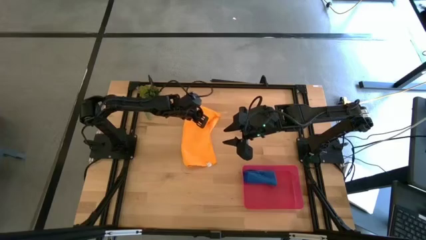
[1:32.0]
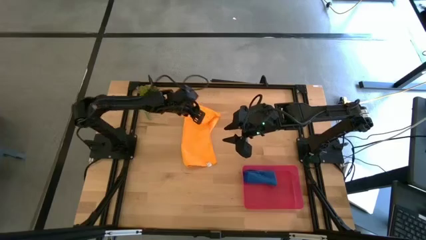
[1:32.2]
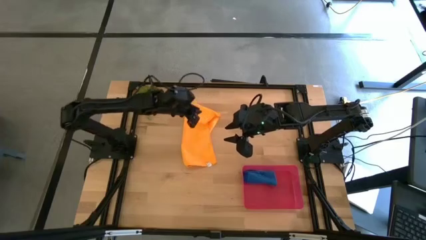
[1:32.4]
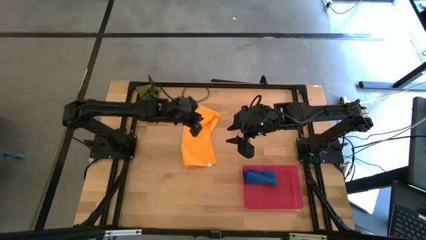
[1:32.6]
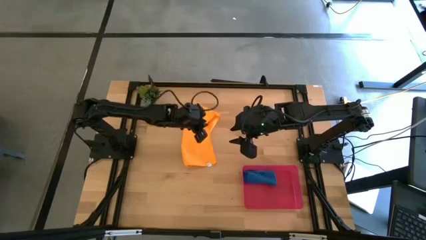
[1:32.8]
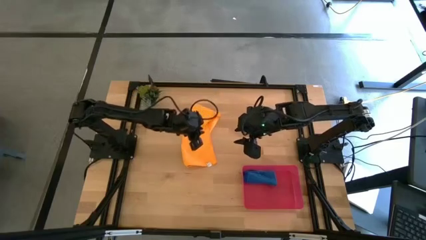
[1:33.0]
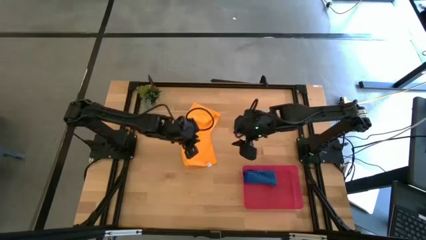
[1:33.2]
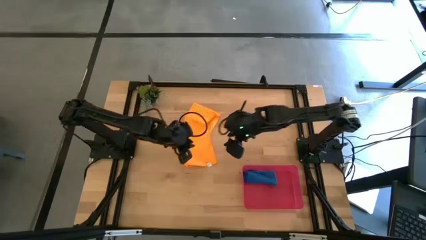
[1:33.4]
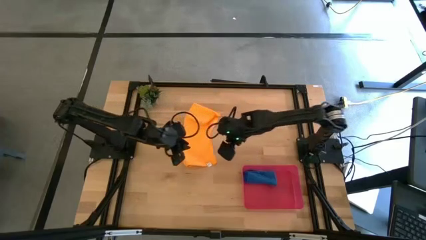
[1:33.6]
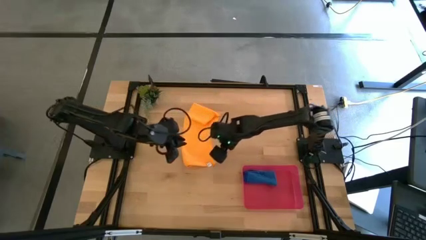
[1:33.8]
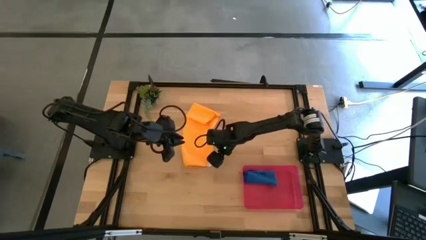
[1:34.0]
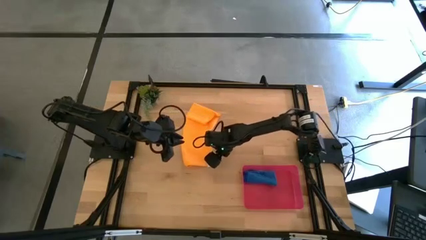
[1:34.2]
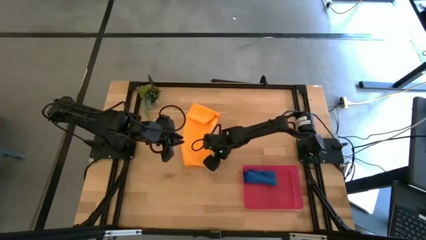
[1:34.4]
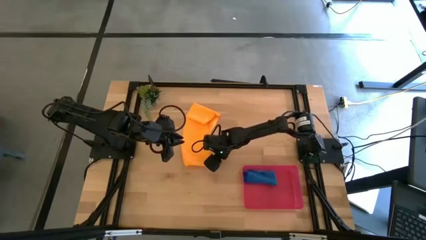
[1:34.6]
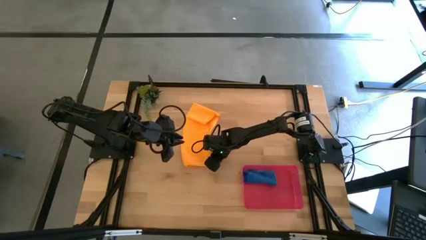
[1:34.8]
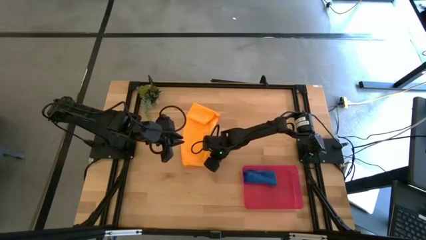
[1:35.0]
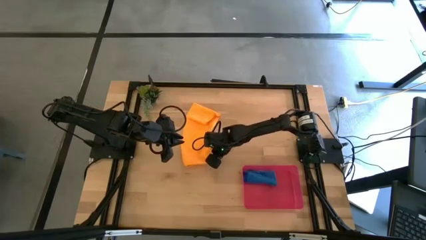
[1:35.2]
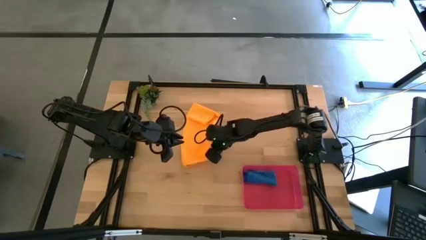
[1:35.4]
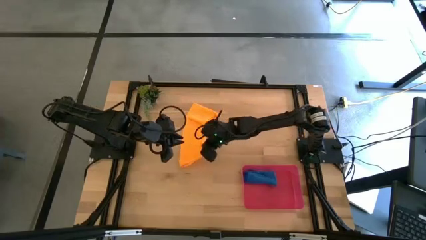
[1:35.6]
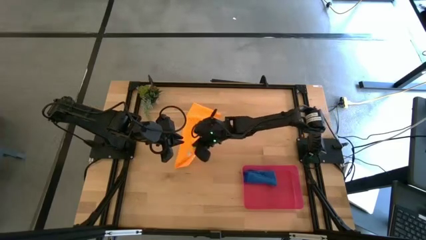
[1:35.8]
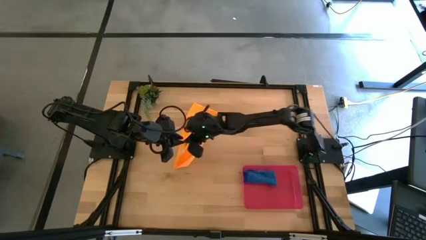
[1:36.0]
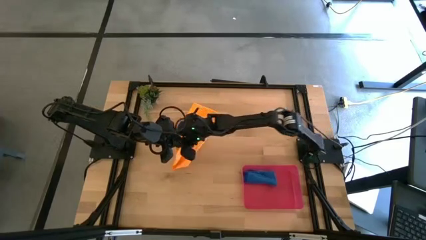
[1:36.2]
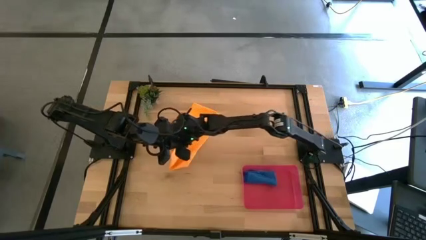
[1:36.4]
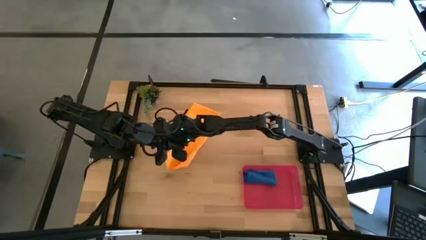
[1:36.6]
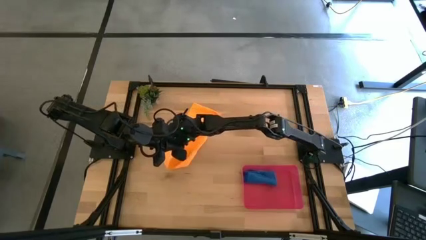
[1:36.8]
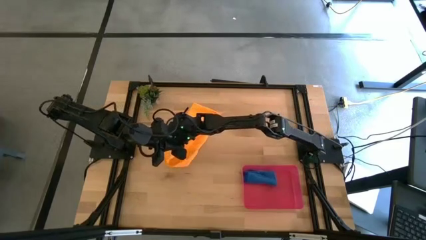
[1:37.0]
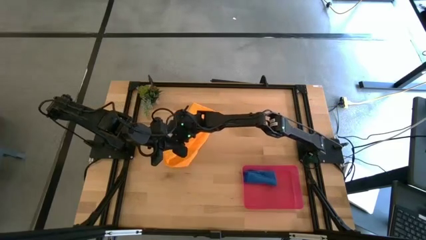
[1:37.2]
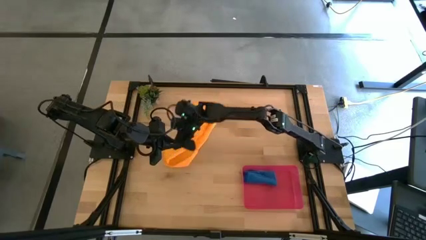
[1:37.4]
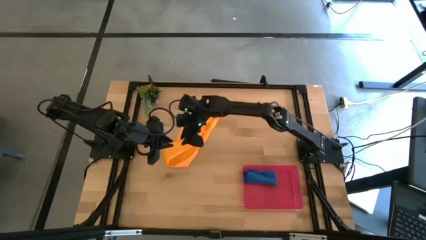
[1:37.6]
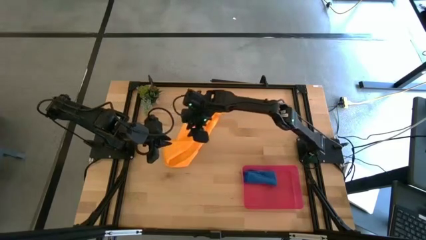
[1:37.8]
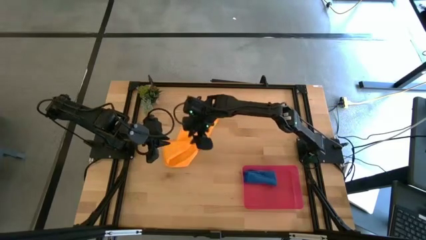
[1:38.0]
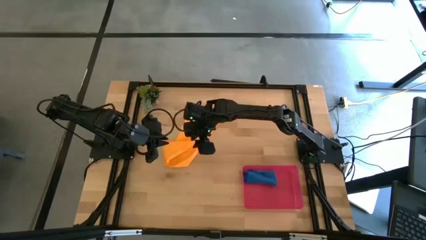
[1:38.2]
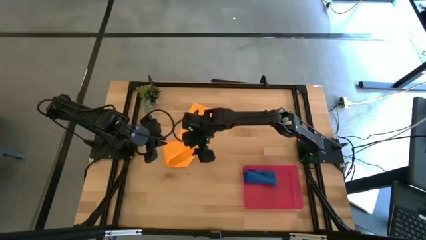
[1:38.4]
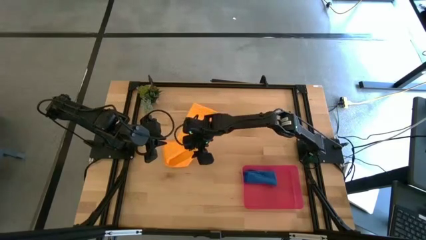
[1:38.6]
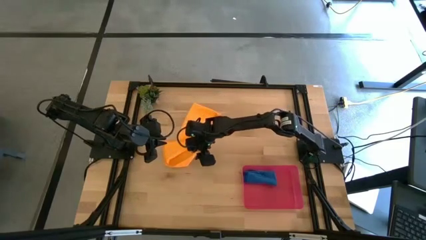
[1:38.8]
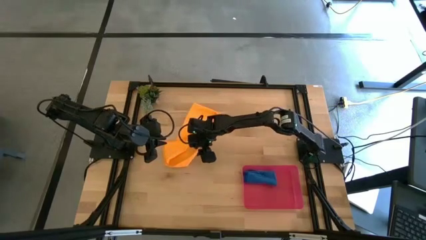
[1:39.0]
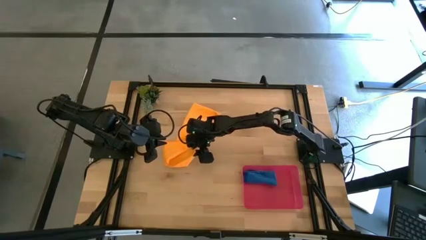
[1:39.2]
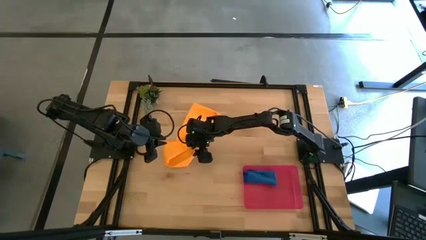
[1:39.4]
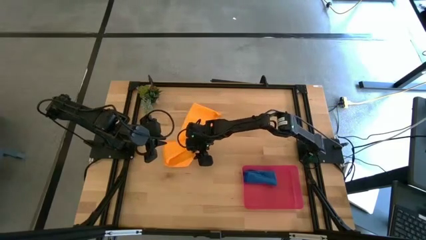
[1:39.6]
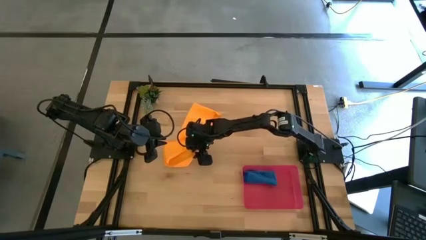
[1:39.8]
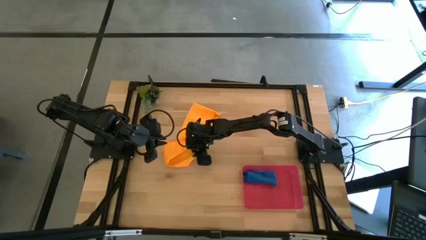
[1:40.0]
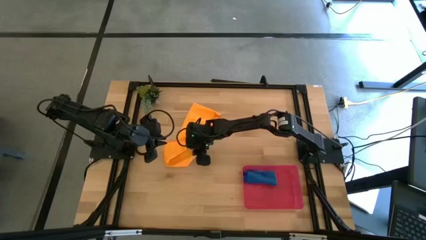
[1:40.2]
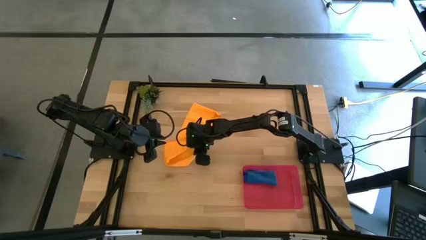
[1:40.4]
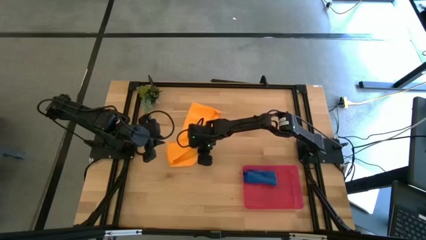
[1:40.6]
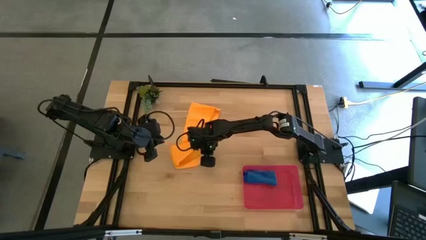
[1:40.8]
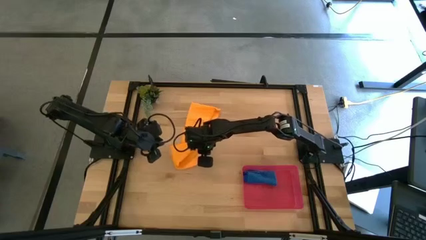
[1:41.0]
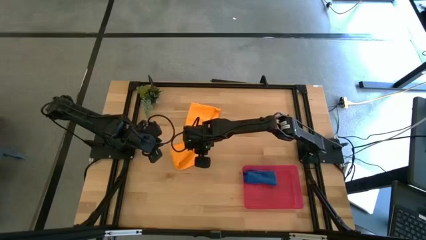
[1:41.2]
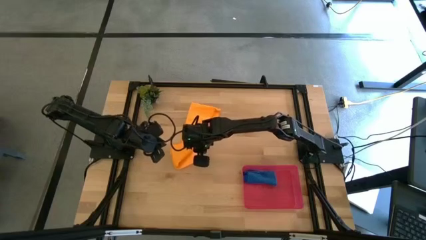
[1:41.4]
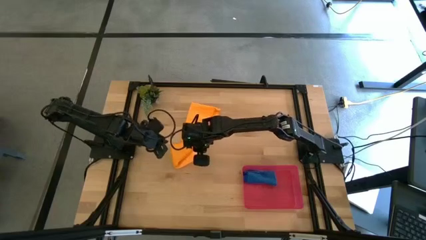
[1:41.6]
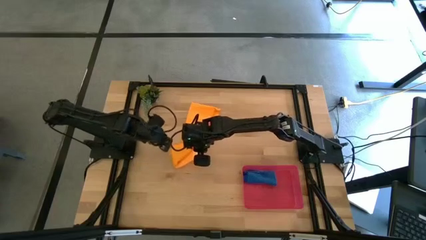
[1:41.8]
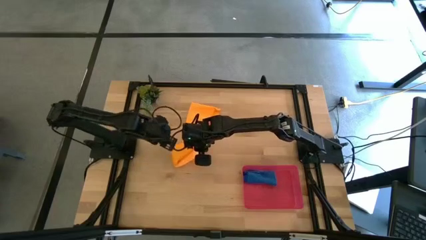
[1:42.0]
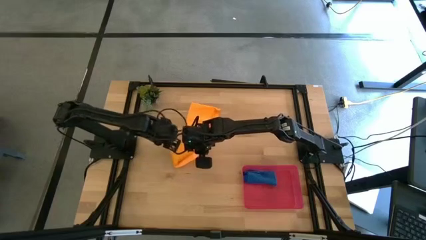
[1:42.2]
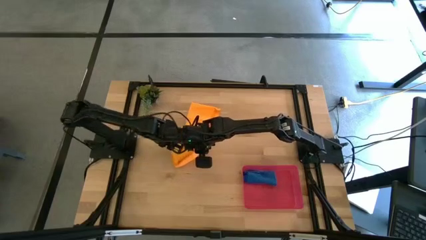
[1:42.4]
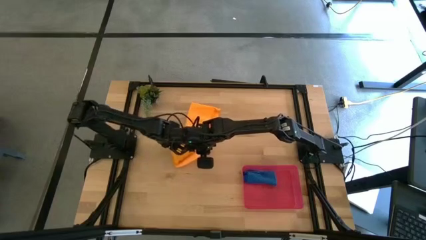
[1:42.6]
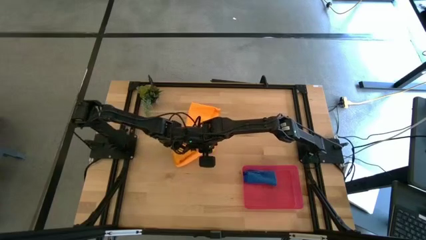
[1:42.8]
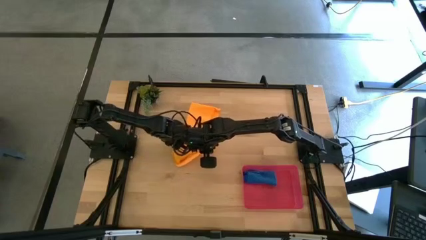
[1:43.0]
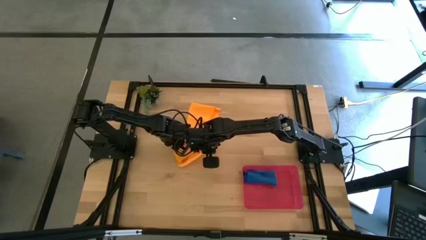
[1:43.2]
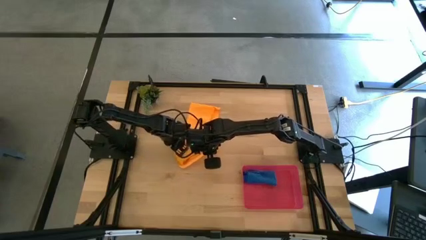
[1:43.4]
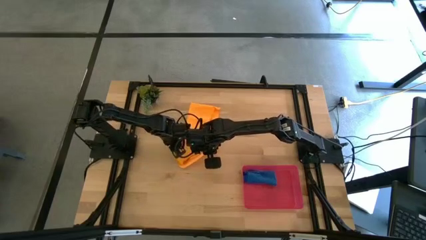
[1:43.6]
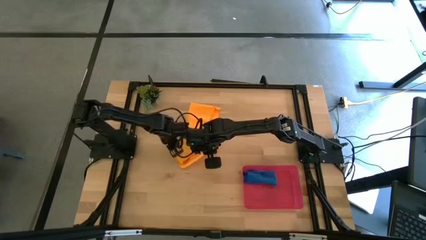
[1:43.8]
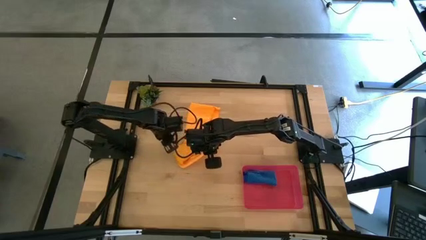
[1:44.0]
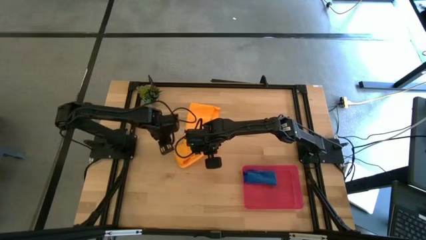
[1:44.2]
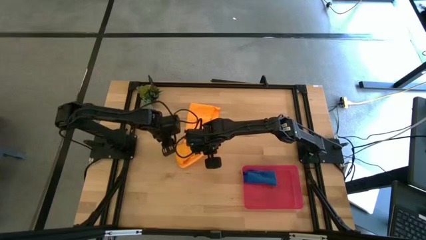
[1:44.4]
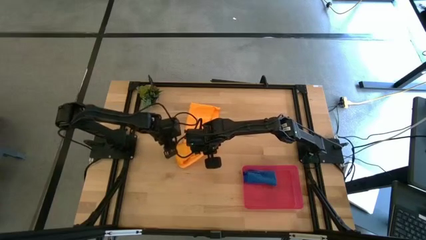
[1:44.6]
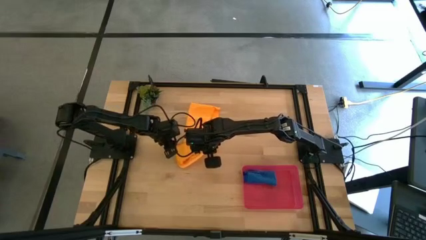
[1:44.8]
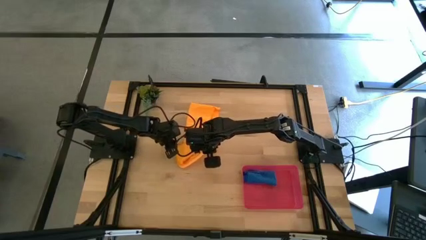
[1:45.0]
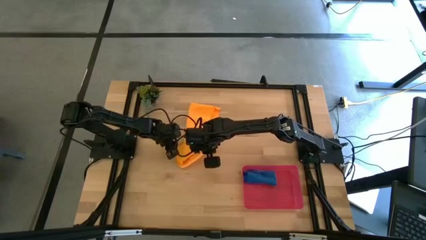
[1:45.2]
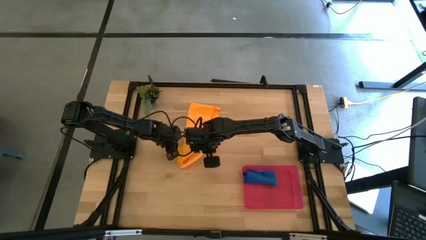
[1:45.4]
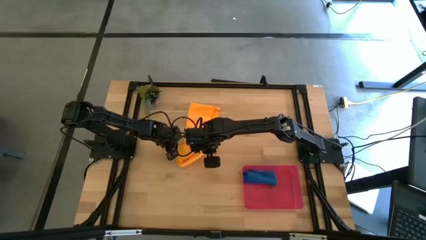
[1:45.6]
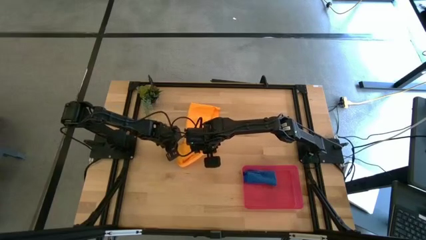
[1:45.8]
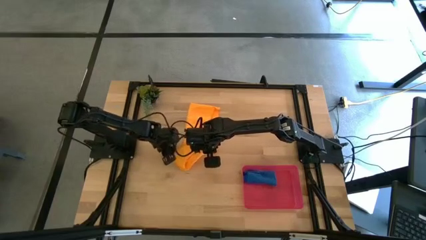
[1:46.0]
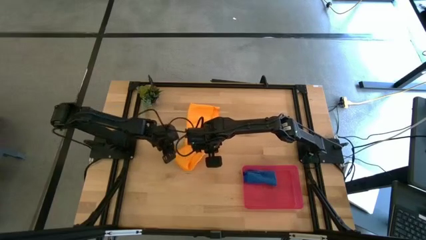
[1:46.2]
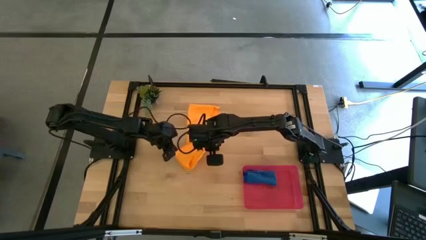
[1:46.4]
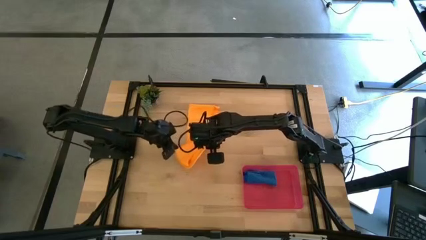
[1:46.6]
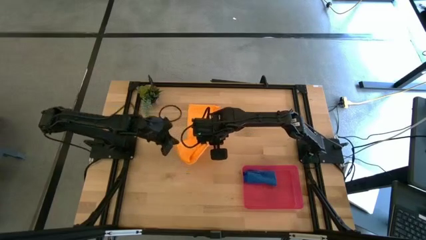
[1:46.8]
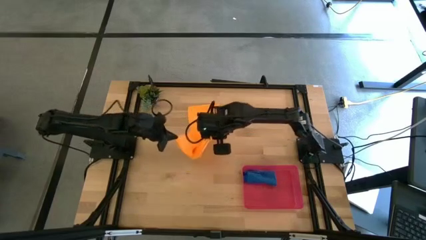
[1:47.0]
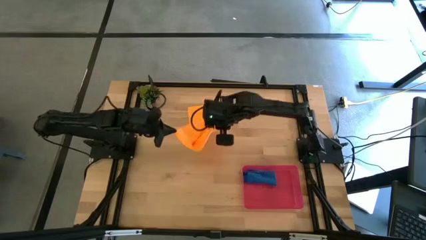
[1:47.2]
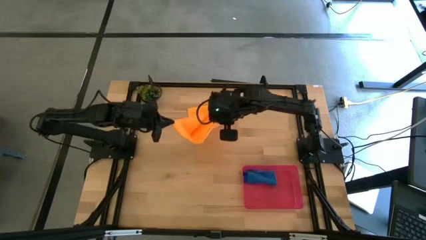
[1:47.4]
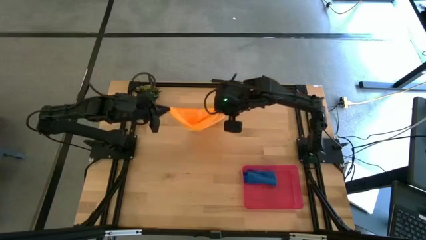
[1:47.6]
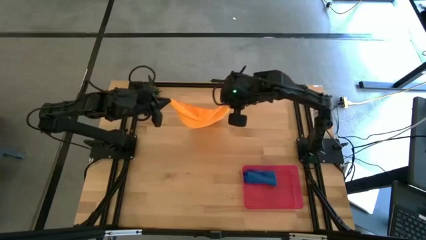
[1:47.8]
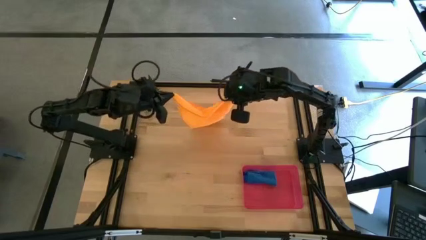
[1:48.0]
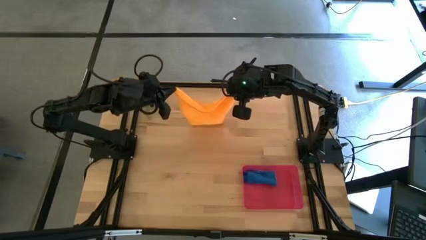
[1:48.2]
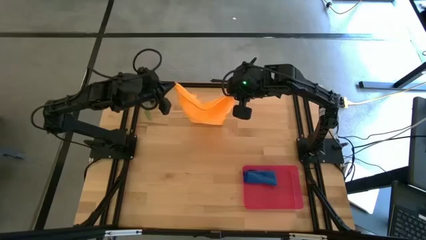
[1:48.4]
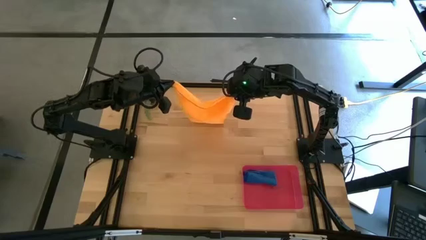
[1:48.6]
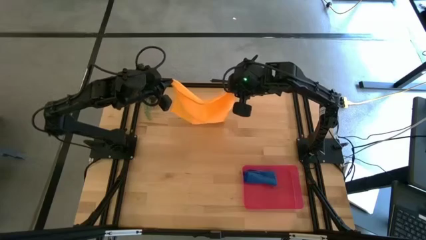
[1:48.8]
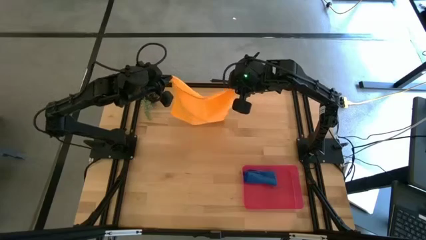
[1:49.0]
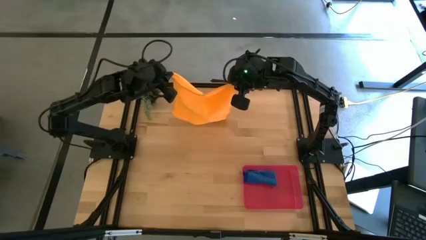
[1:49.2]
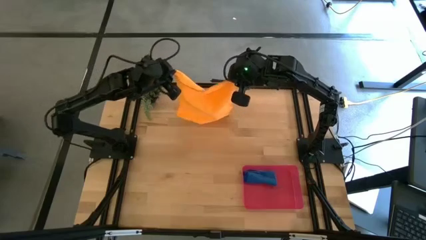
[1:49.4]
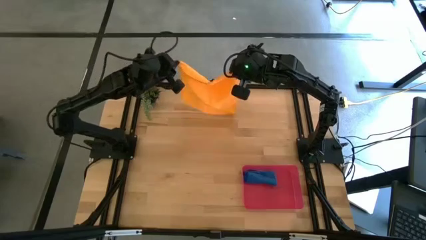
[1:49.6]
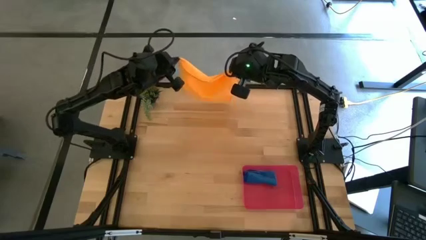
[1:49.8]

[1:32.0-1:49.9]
Task: Roll microfiber towels into tight, uniform cylinder then place into a basket
Fold the orange microfiber towel
